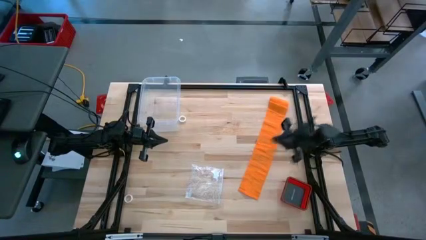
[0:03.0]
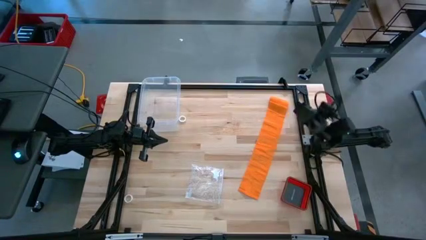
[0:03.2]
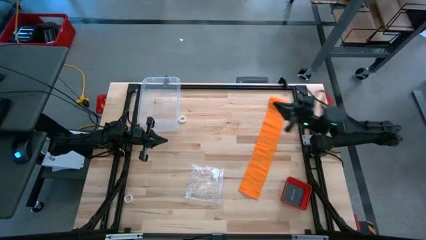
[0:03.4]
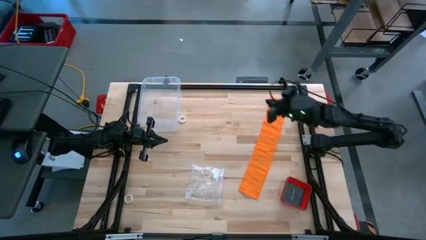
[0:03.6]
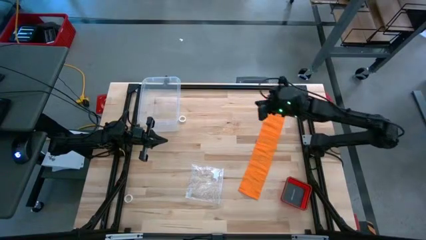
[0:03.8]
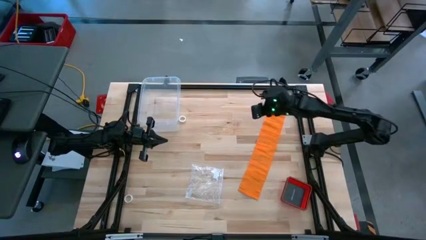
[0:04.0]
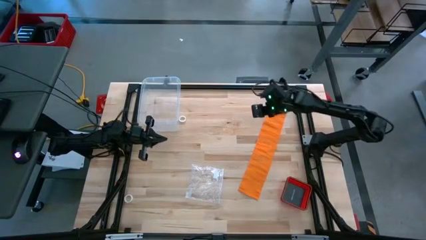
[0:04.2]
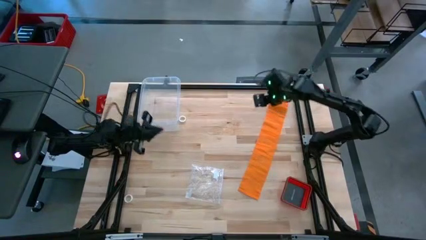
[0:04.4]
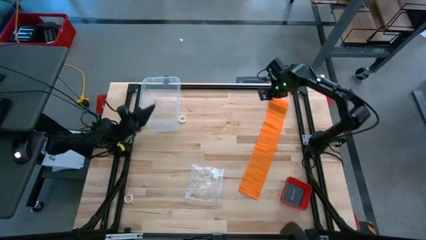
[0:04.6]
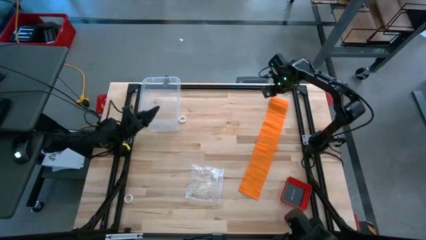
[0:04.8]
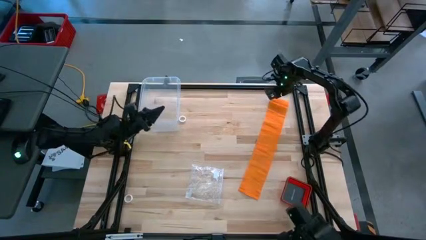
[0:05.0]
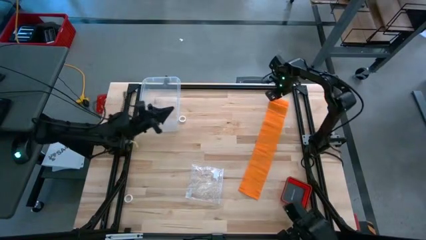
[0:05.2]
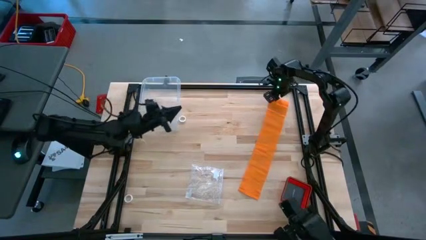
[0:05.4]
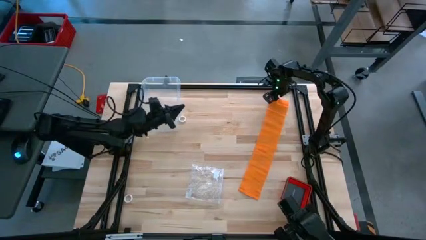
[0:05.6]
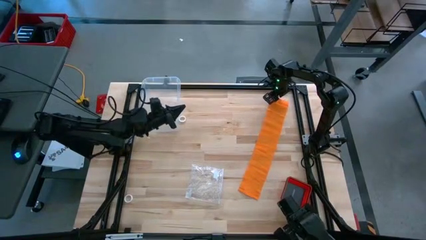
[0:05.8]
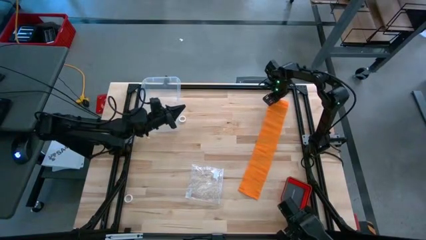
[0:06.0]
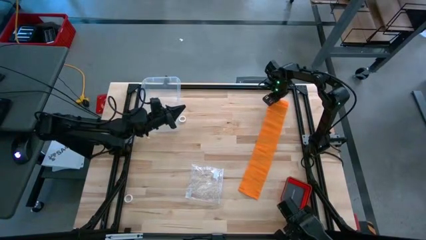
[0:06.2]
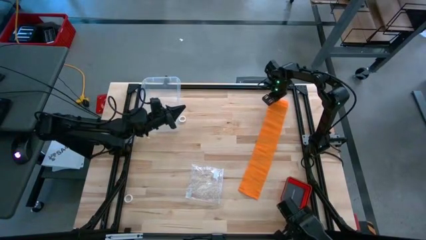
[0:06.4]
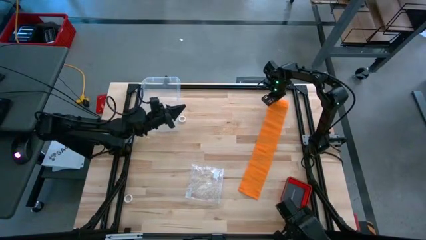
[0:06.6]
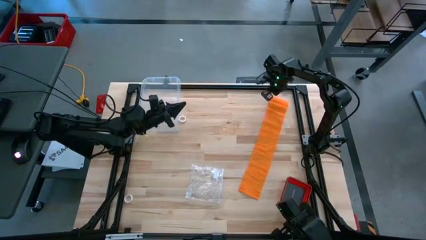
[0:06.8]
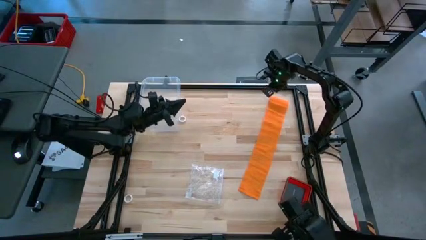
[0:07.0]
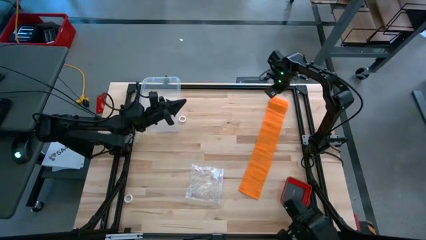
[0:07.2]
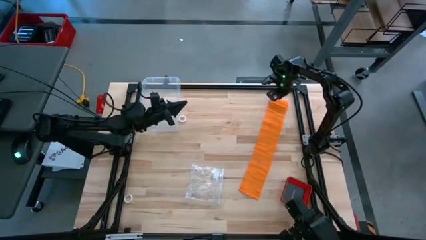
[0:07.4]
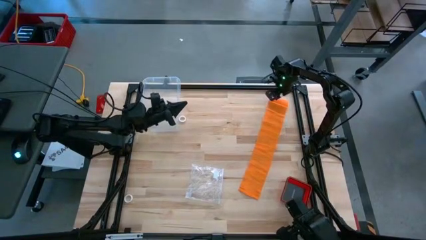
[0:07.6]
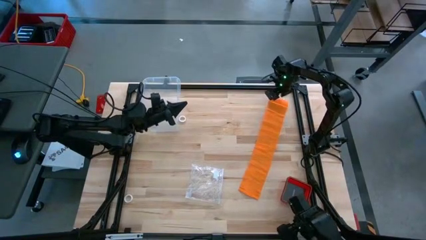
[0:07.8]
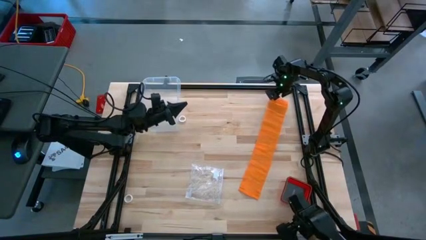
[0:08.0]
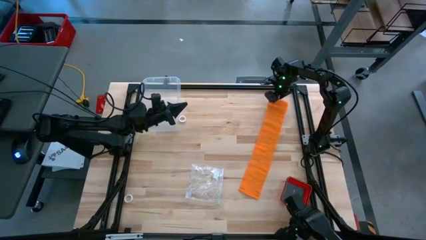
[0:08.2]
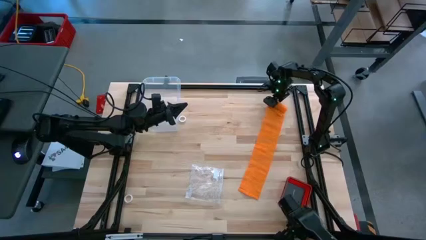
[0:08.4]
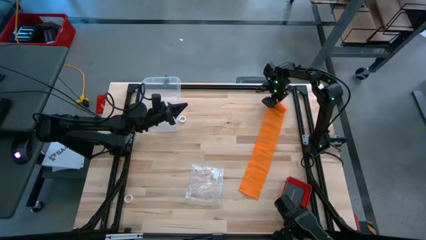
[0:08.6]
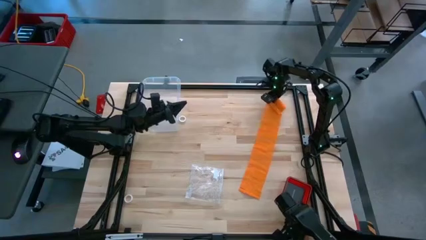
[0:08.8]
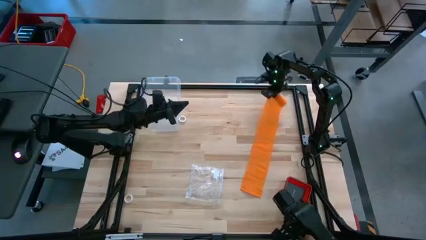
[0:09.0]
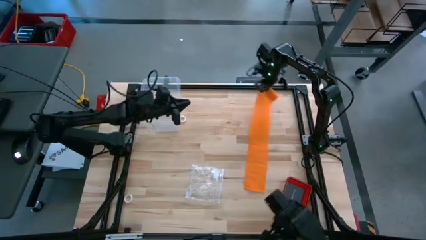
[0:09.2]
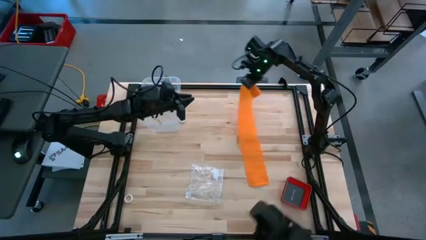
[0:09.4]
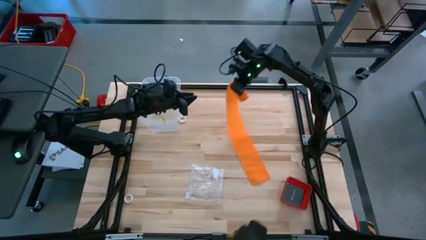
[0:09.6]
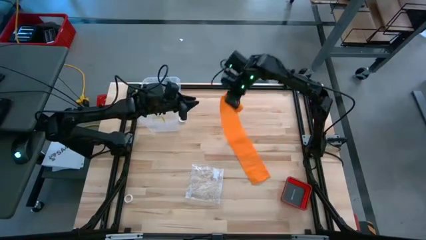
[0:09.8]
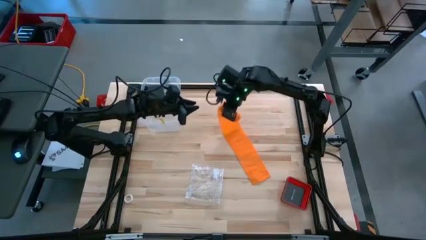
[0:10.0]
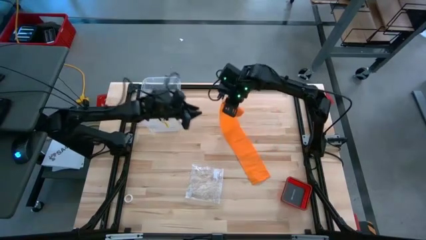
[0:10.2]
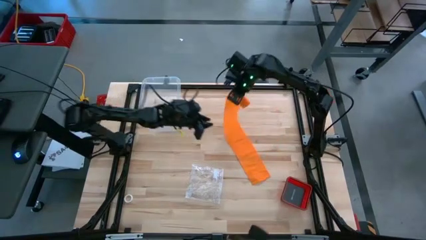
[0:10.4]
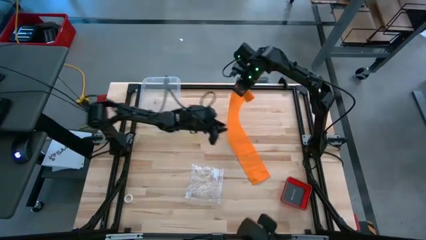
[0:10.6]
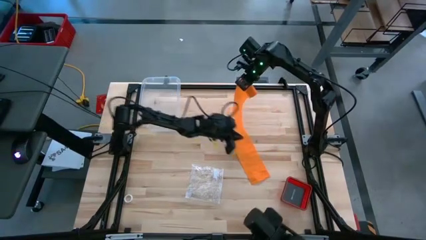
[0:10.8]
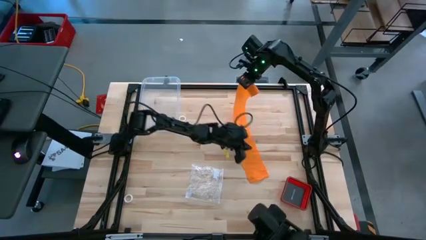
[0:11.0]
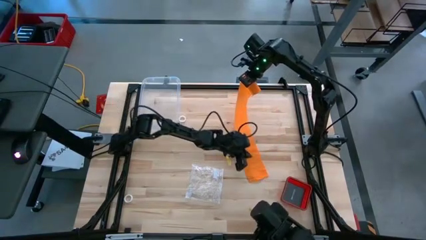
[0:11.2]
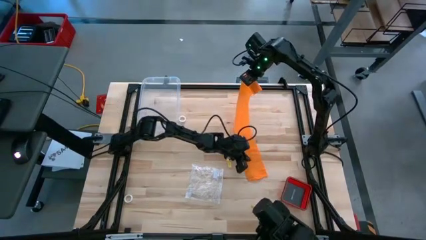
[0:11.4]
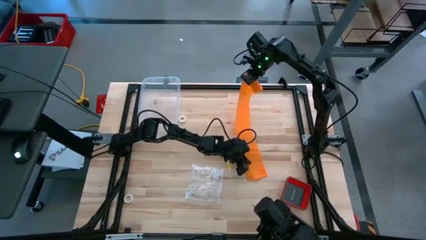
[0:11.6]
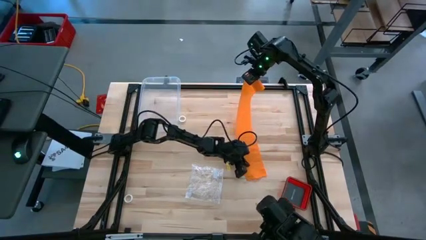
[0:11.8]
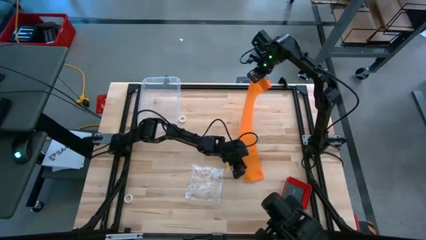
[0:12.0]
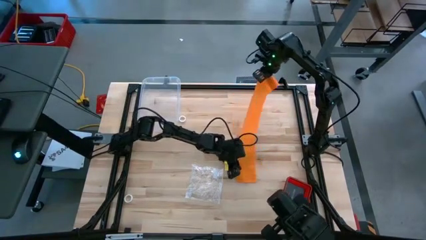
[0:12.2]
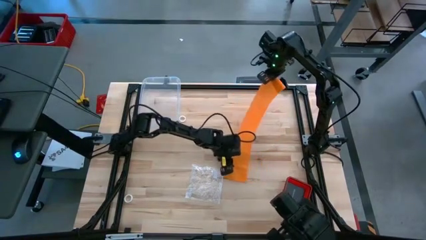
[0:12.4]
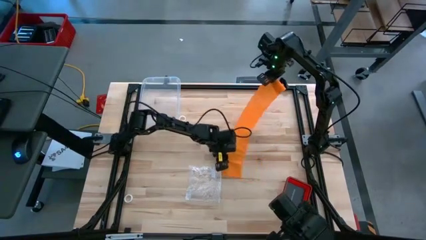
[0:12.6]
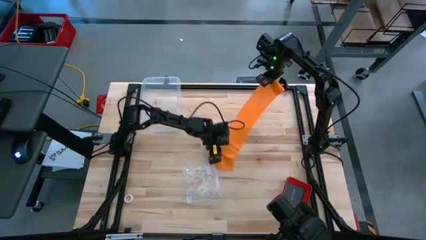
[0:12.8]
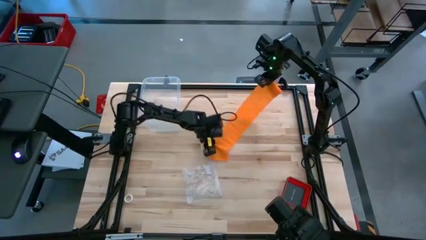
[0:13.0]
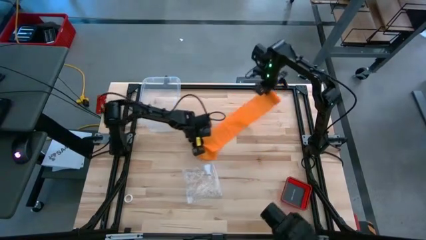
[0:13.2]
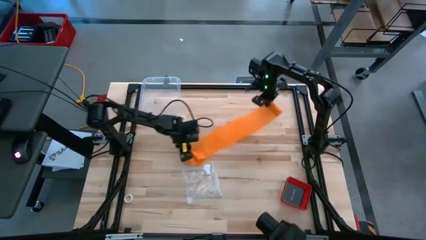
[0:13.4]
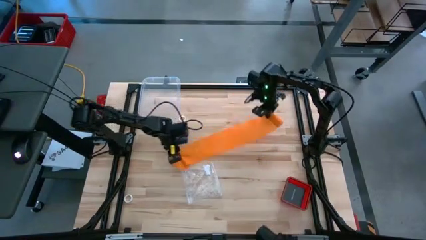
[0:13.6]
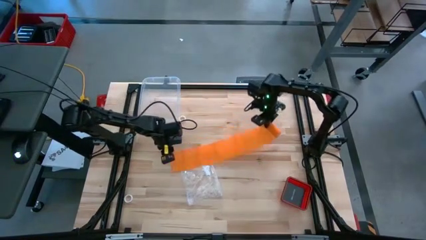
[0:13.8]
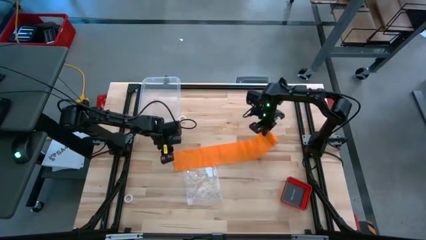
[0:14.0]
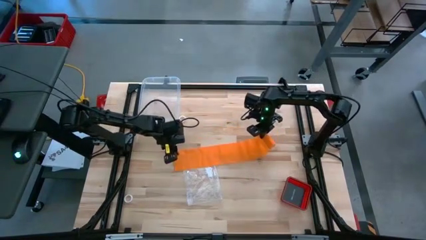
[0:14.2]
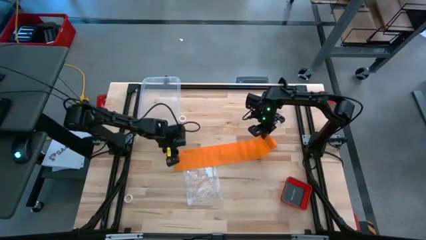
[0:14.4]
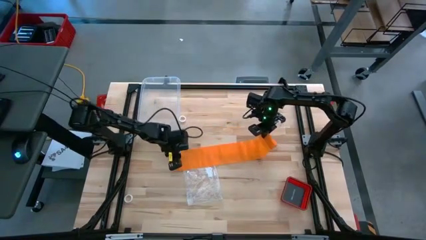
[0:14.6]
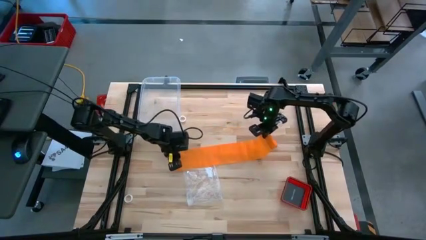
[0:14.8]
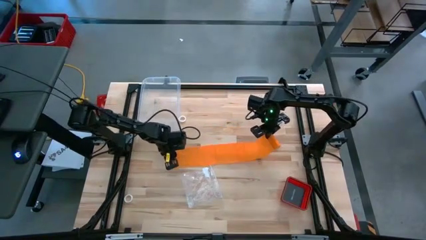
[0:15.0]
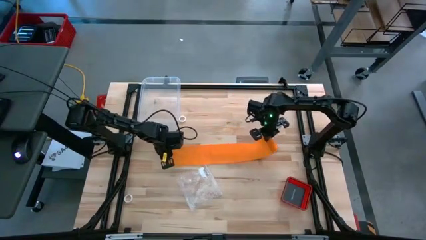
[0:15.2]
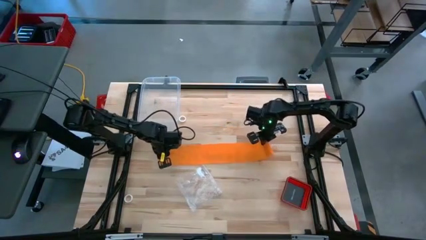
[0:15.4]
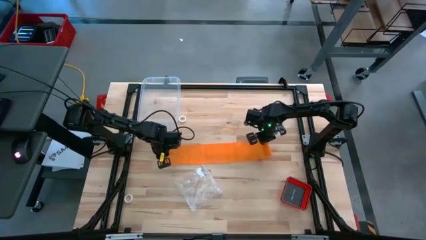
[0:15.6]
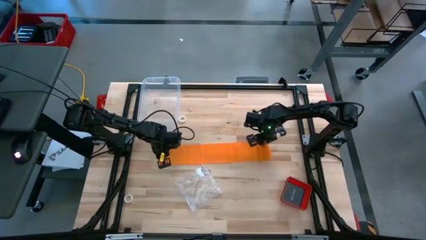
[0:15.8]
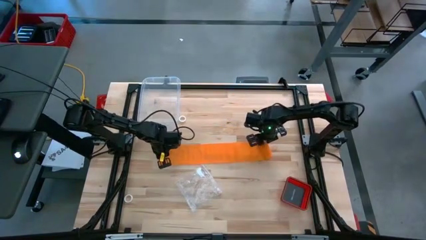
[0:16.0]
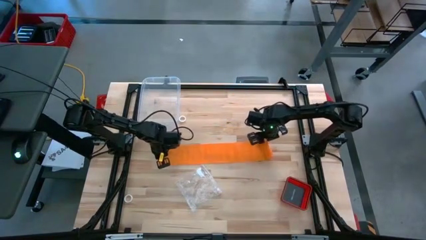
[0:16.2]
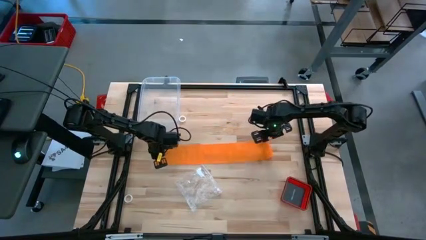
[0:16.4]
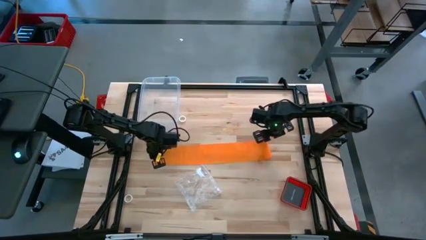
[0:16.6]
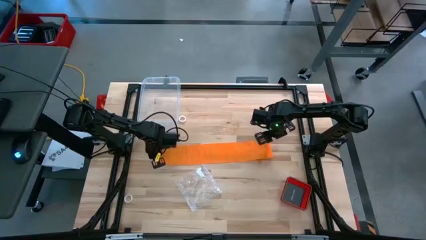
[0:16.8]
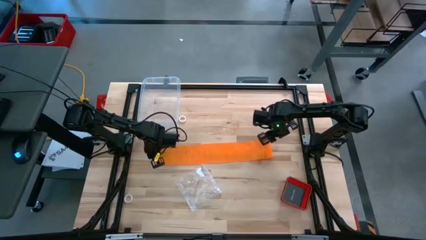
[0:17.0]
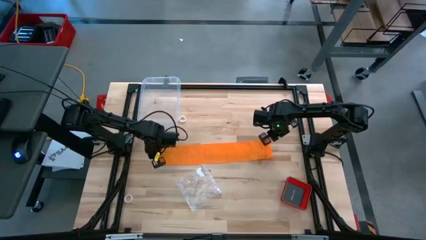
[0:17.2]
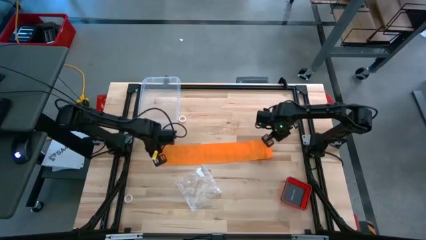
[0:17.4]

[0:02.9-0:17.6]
Task: Roll bandage
Roll the orange bandage
